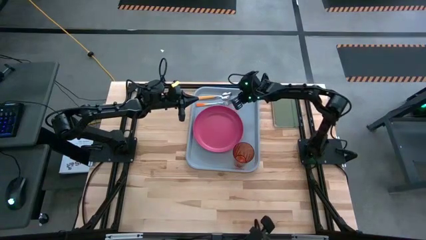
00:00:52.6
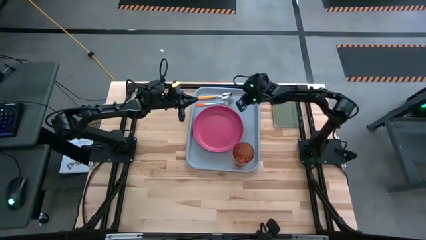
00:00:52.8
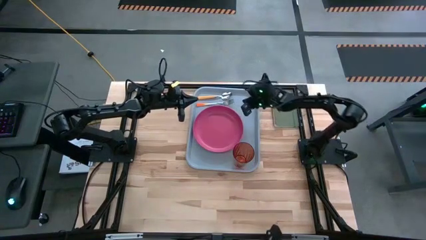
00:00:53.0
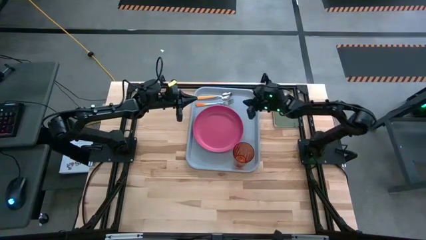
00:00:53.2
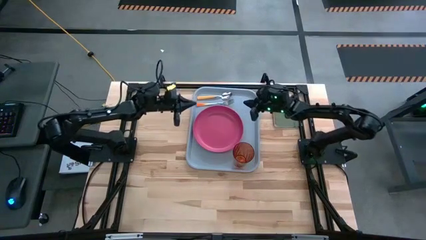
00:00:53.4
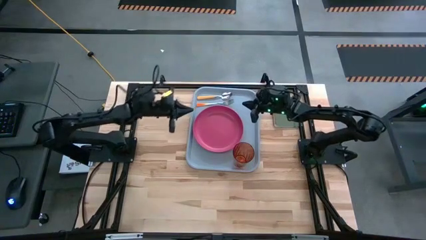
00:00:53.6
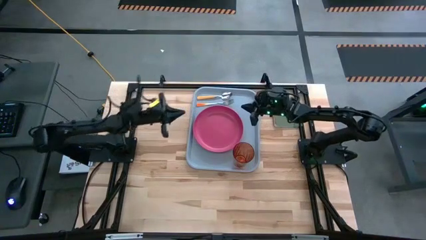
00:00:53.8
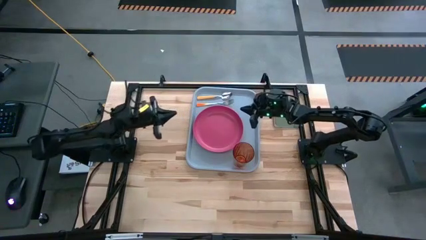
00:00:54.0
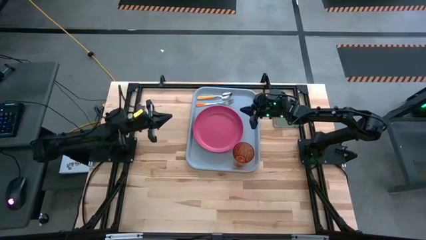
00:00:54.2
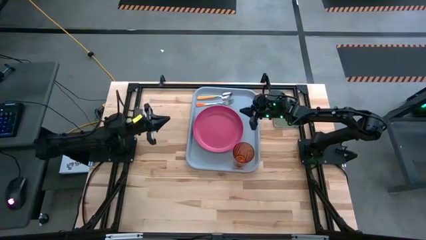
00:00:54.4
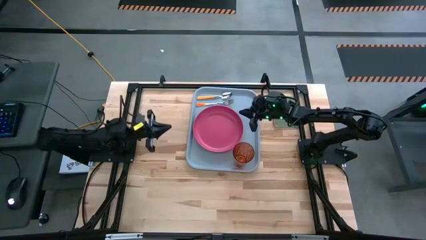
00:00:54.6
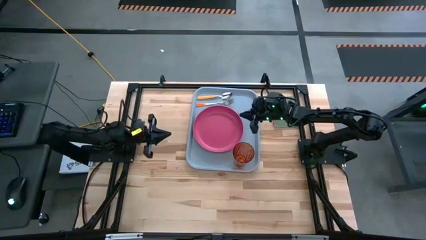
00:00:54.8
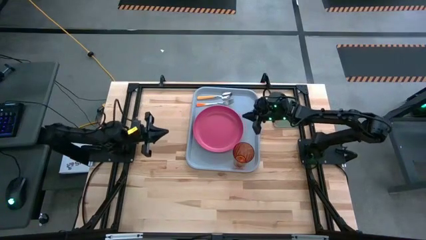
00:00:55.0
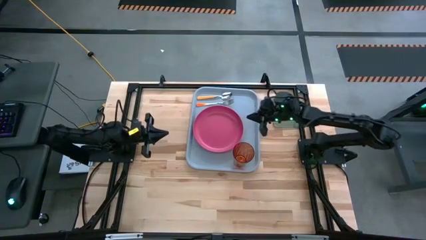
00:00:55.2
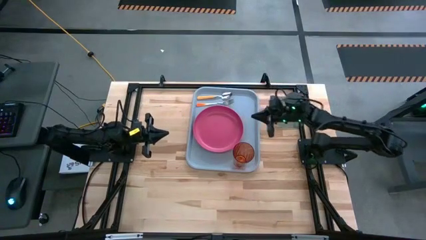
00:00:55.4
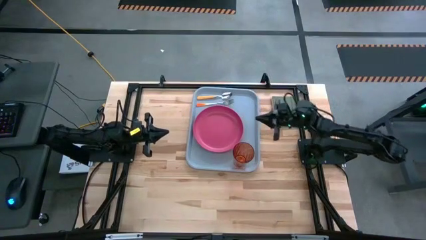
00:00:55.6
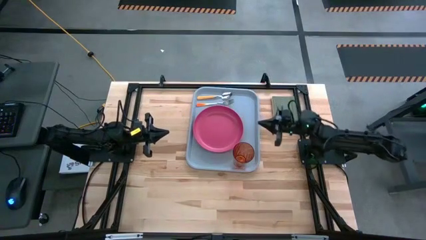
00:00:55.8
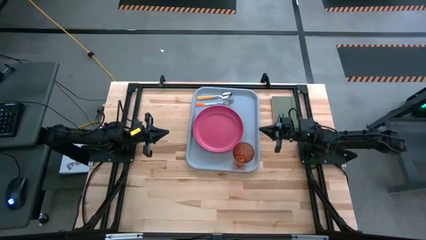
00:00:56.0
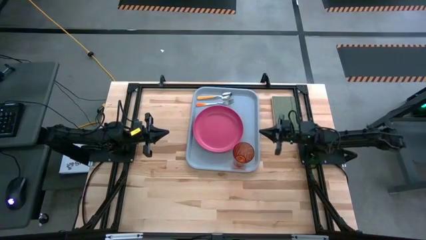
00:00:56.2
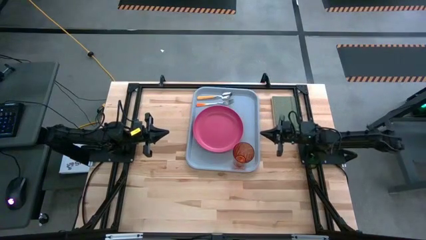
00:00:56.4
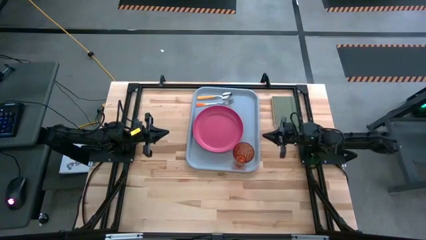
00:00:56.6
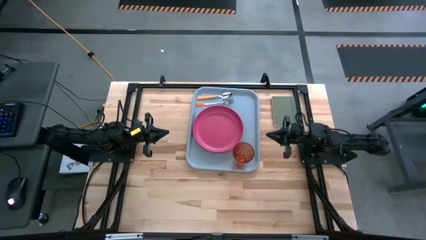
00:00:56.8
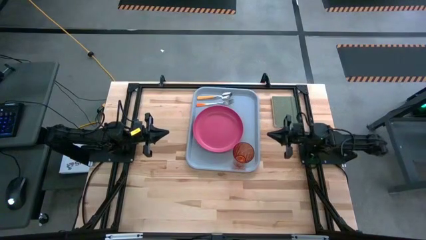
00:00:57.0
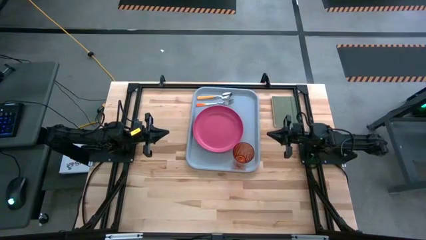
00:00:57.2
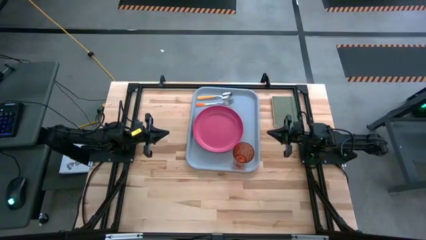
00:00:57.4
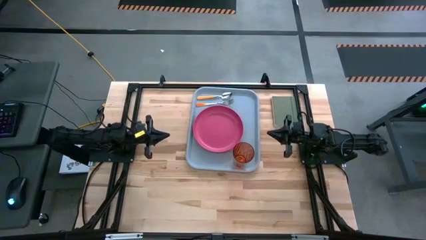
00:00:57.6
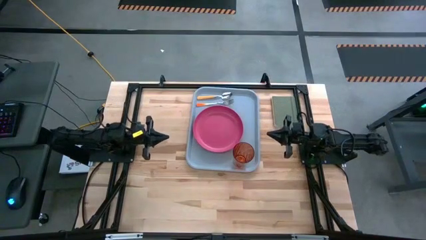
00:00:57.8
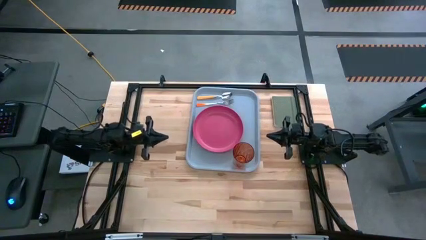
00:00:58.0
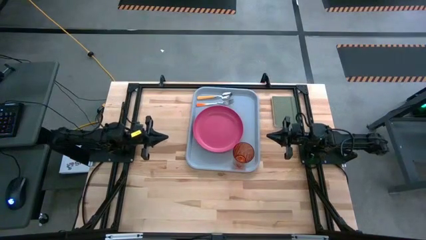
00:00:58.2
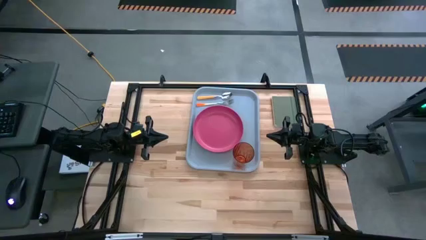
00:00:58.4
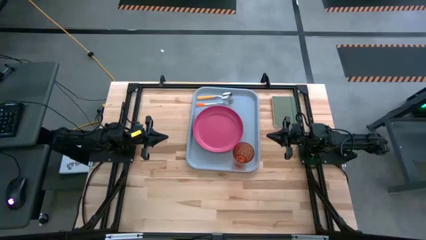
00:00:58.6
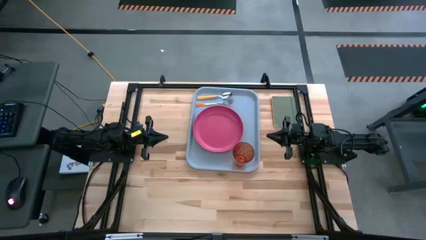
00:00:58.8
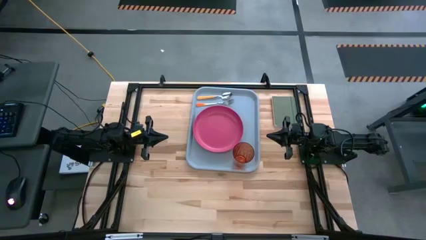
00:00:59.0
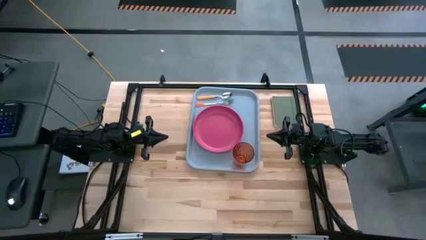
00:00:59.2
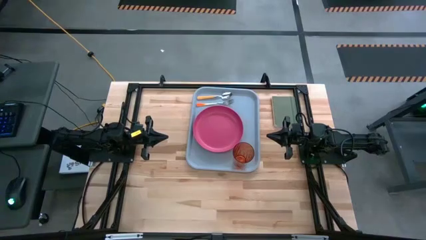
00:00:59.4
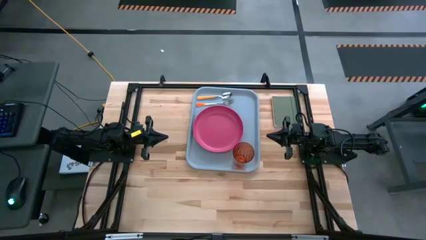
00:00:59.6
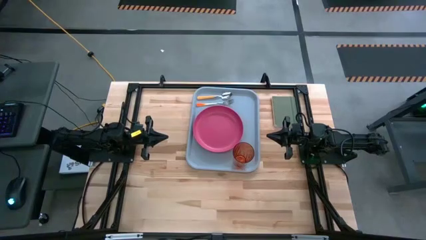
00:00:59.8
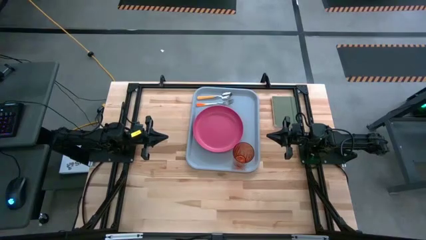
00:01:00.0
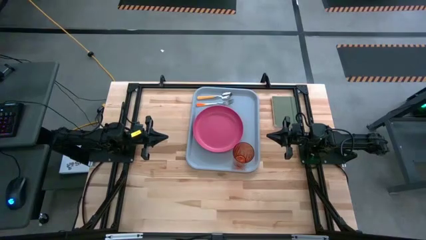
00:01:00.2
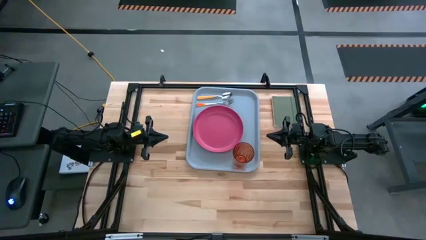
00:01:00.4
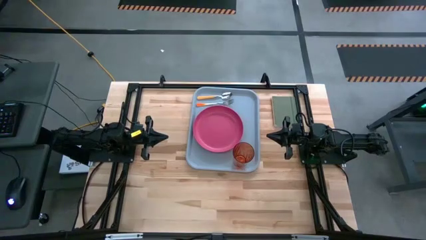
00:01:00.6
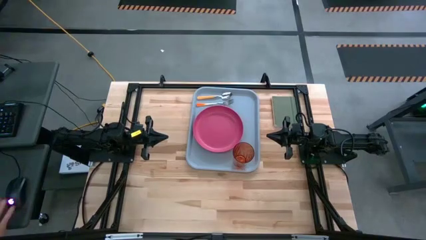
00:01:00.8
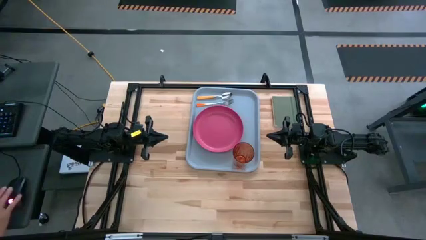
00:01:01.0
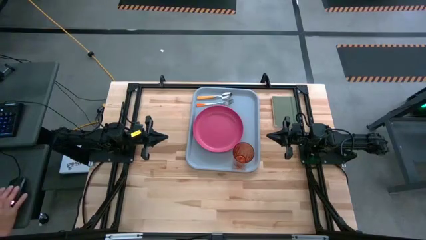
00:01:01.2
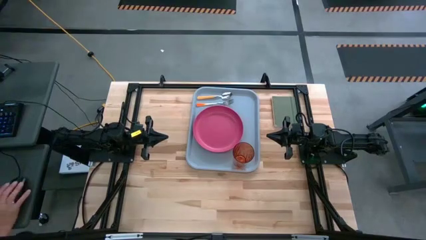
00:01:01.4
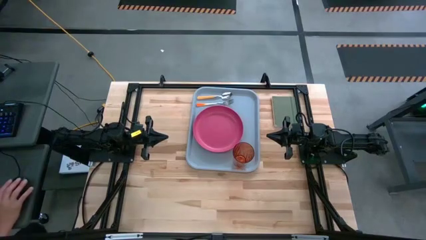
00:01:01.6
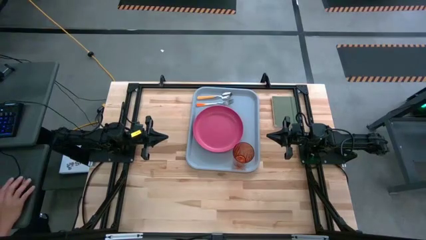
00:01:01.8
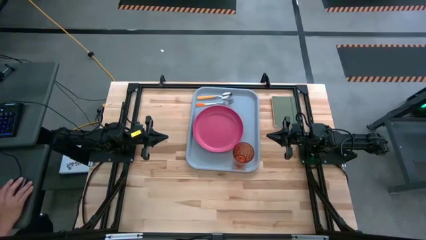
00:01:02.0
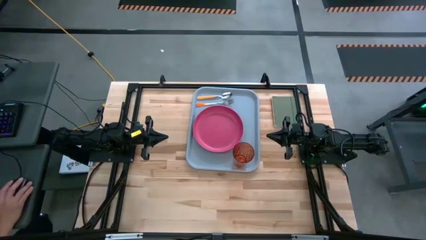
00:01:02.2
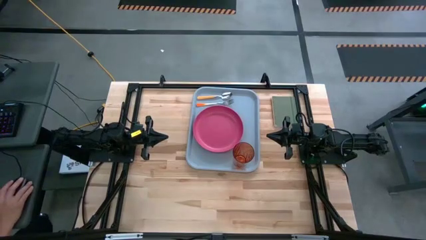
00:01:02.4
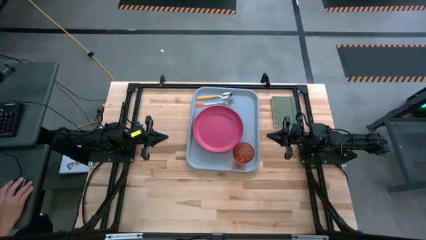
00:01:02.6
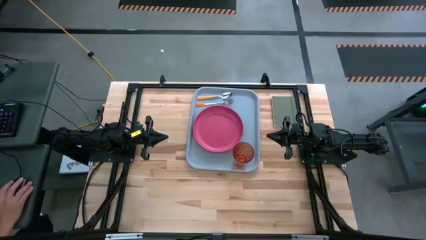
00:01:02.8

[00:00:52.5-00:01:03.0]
Task: Pick and place plate/cup/fork/spoon on tray
Return to Home Position
